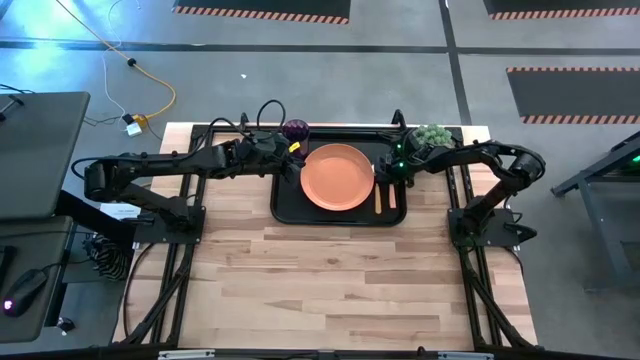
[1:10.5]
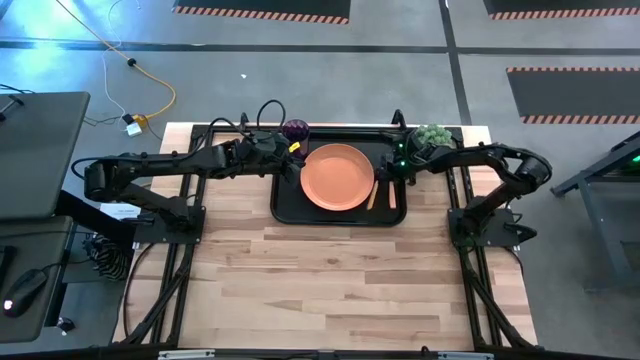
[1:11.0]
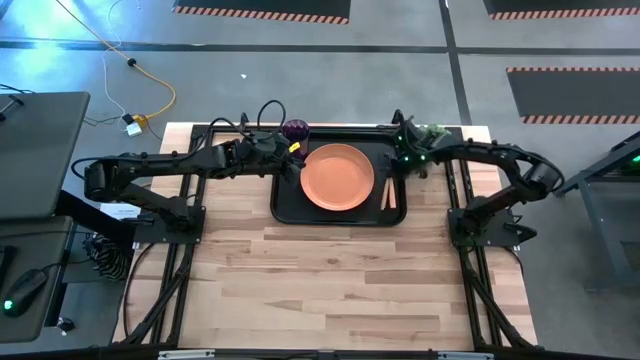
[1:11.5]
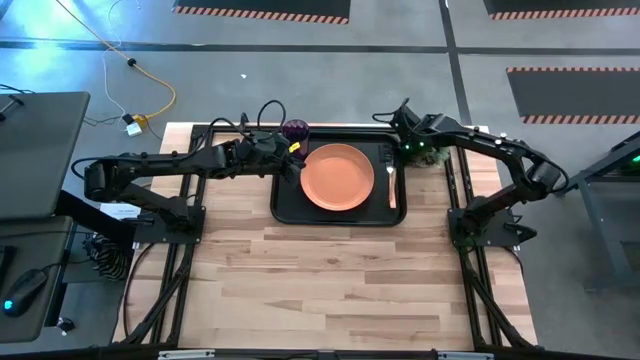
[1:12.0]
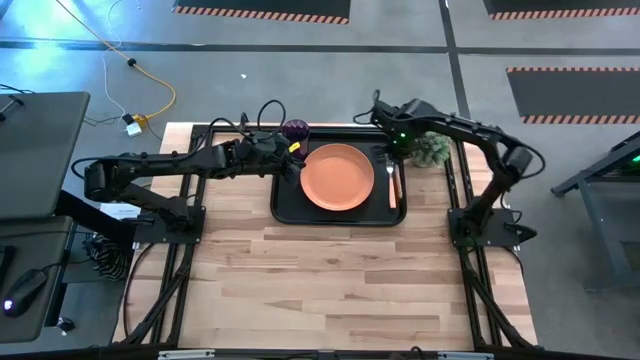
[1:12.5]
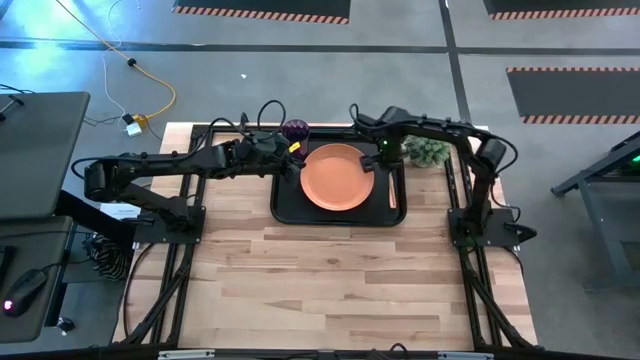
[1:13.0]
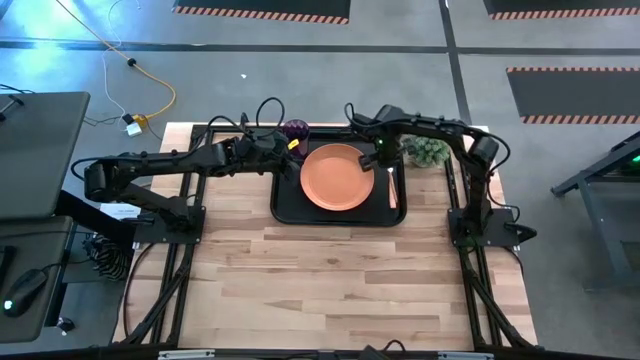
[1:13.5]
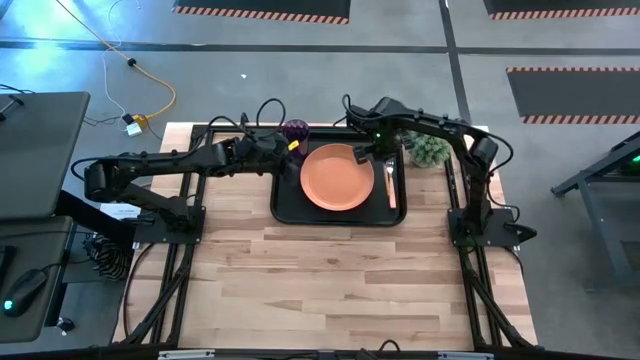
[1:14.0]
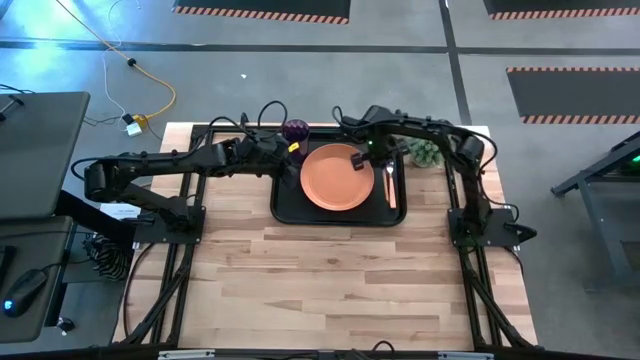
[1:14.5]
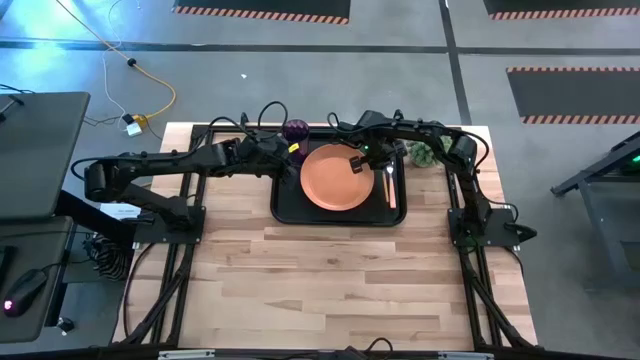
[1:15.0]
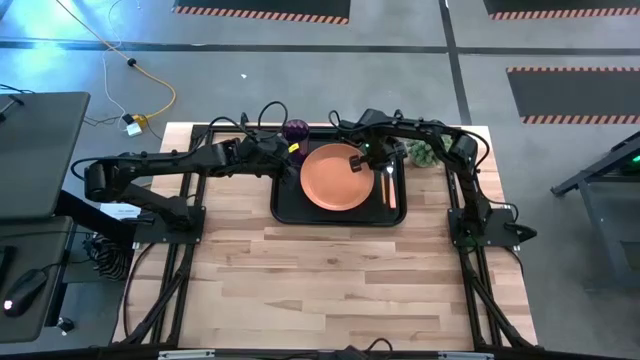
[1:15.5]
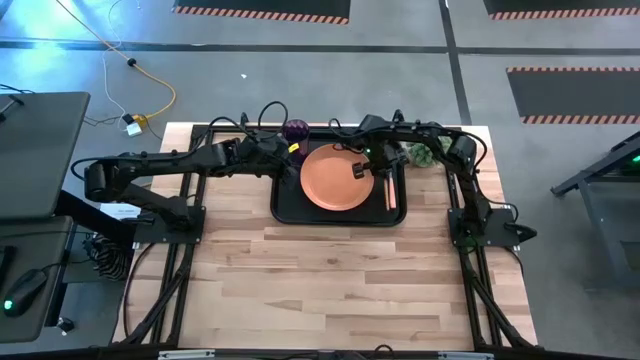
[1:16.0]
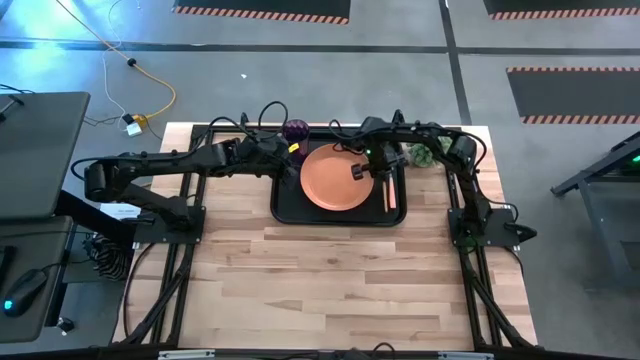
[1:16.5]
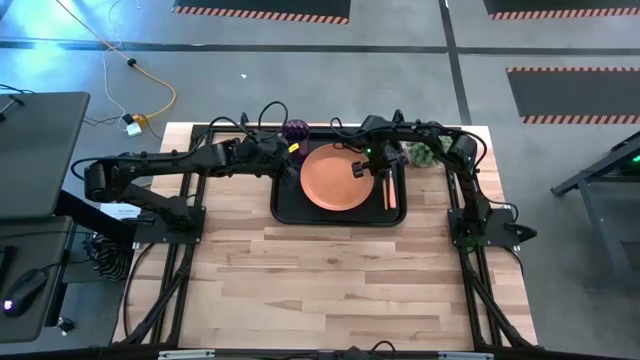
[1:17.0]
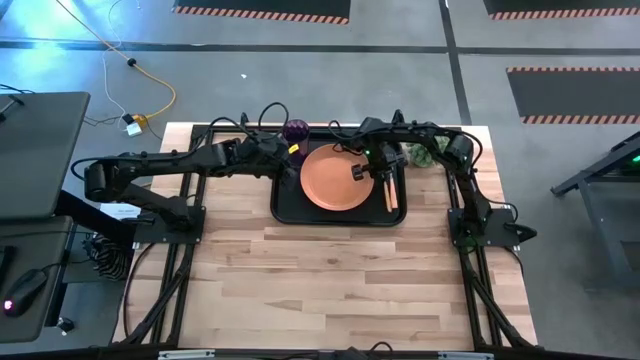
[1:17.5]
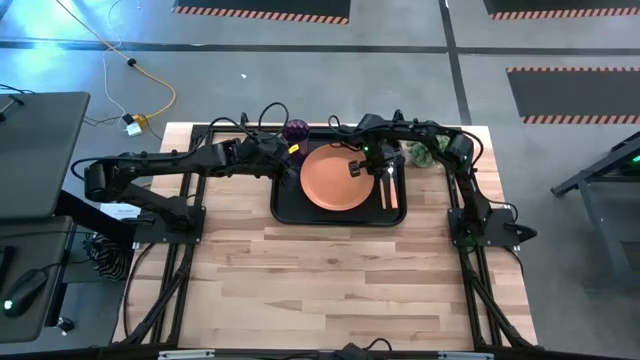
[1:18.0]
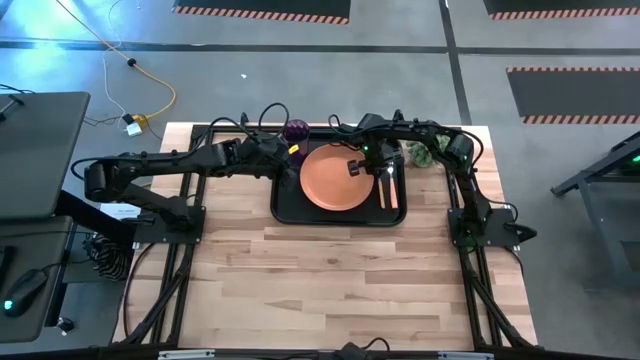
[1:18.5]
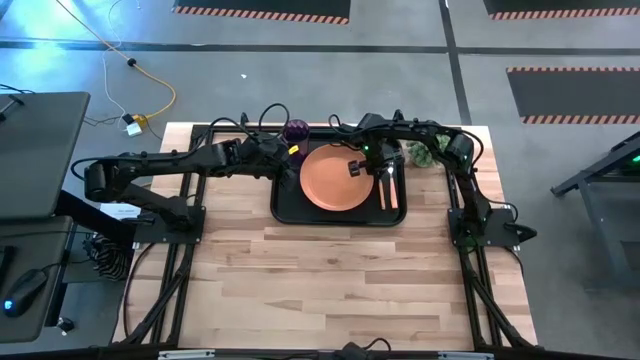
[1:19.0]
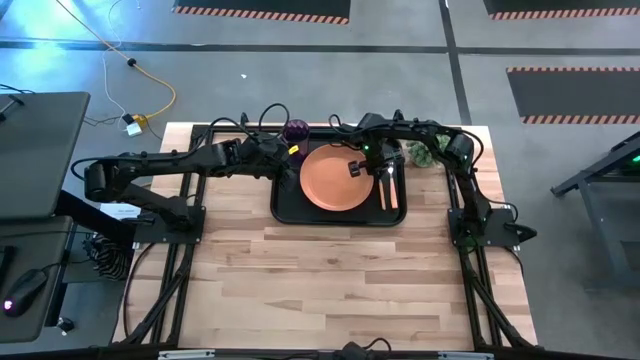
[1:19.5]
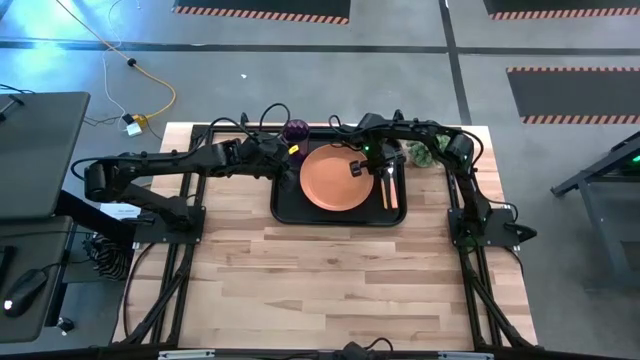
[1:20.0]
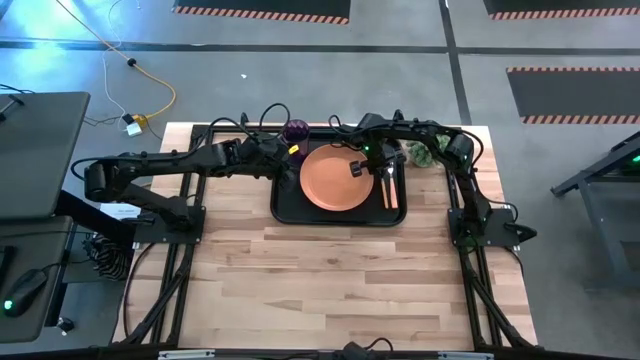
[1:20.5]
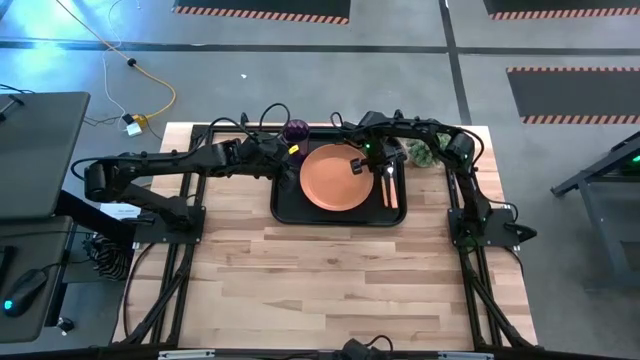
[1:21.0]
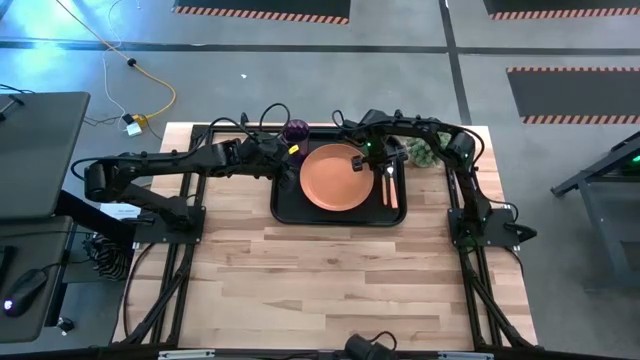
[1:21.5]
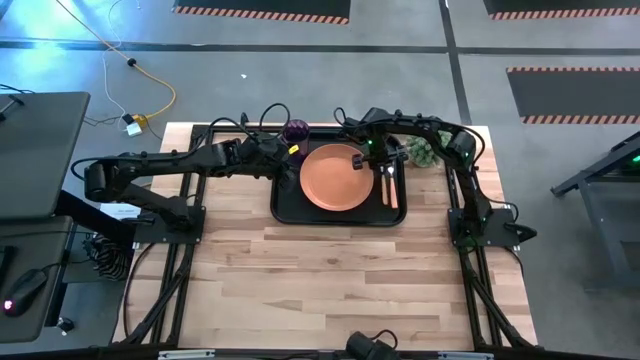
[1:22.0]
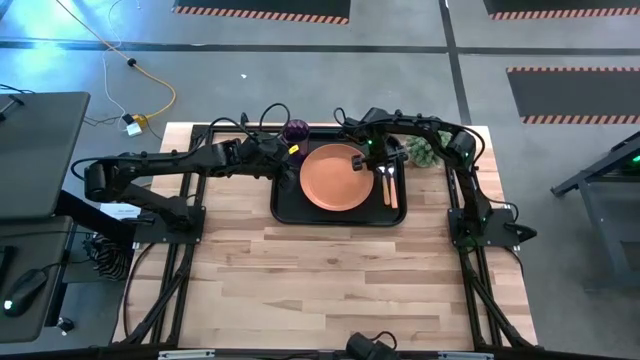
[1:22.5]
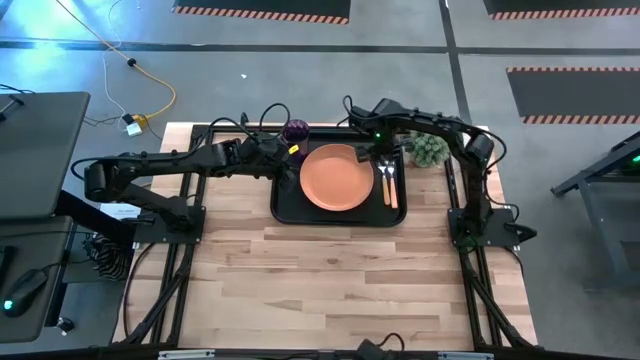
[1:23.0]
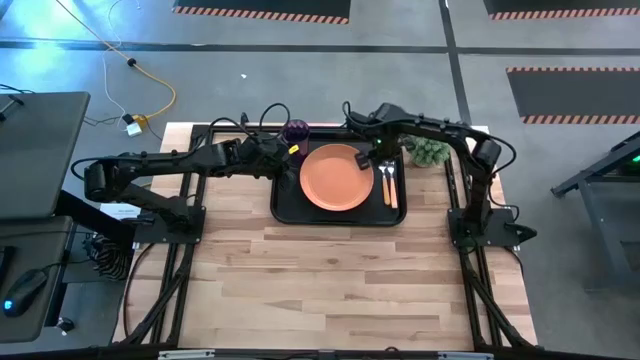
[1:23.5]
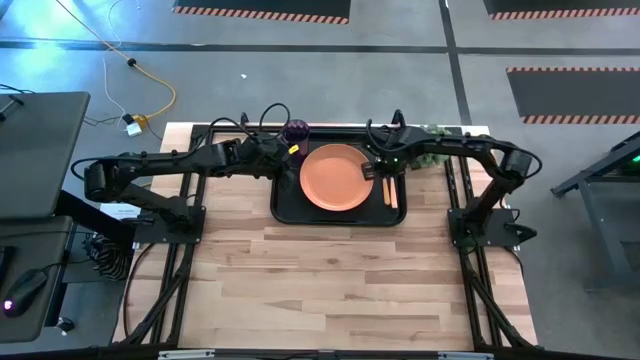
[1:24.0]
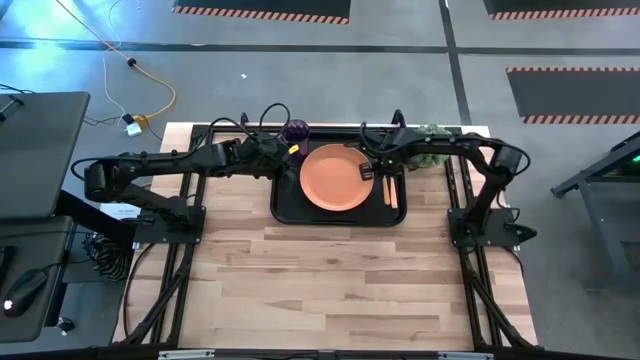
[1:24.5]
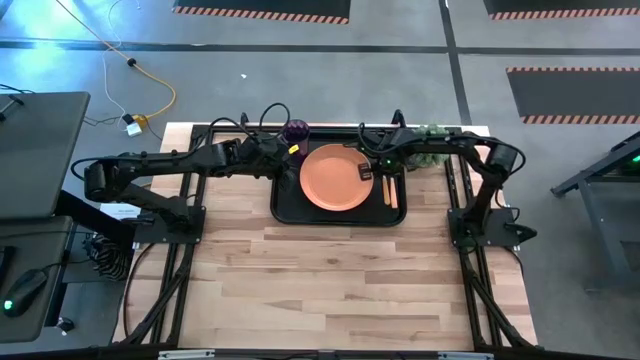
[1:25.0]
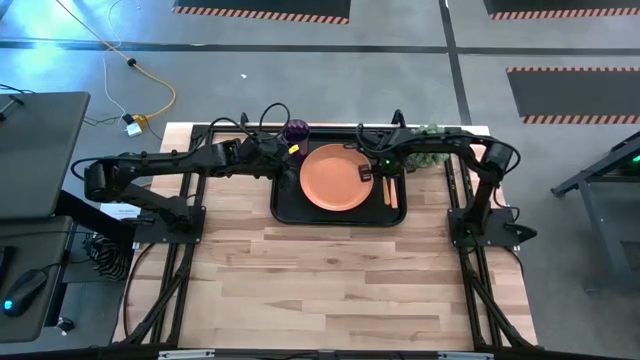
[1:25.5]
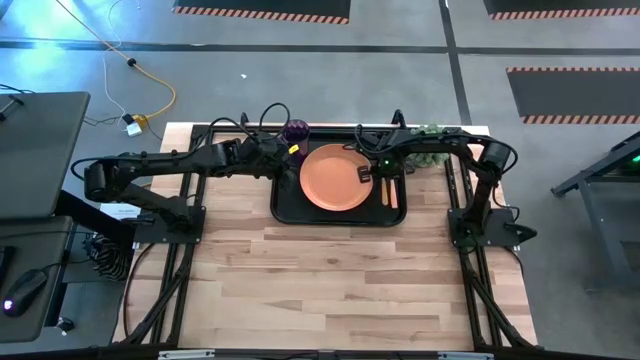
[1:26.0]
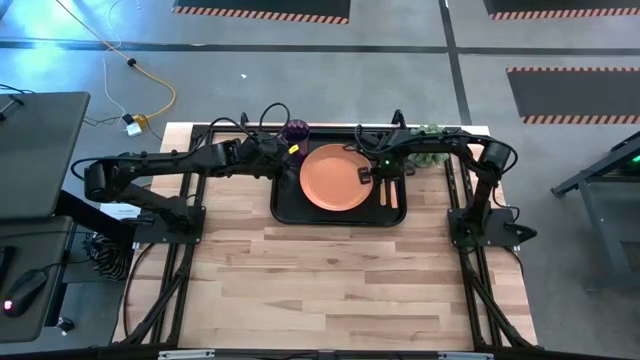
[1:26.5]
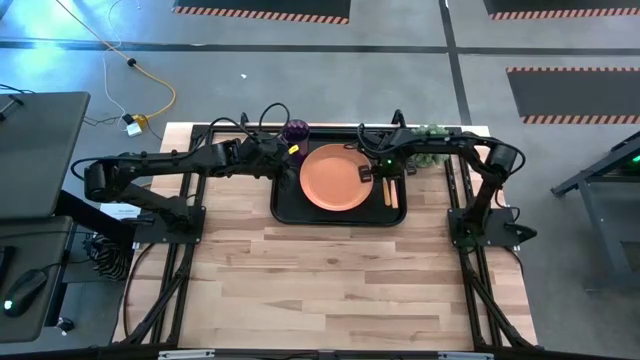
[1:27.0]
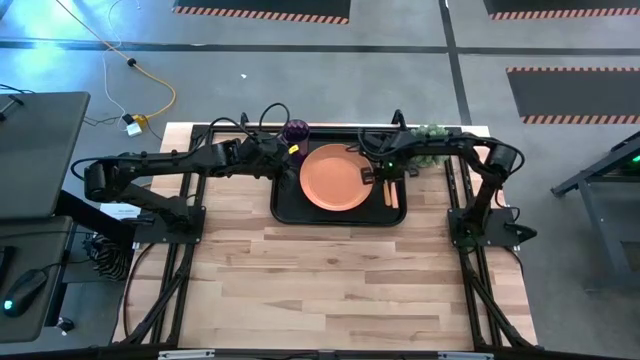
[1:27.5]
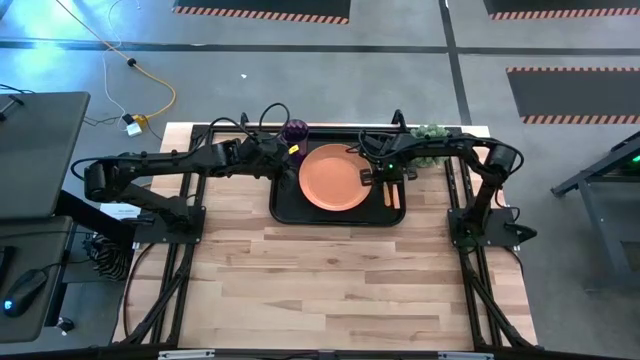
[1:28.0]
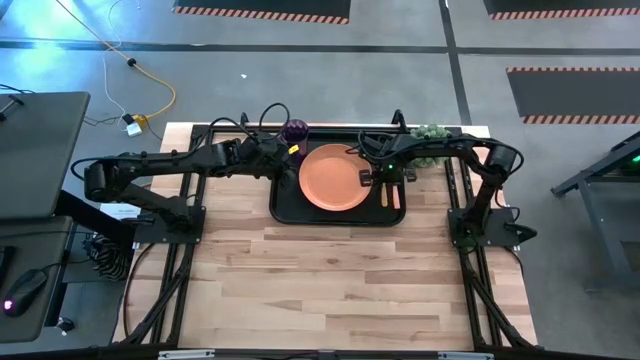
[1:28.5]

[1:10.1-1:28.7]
Task: Pick and place plate/cup/fork/spoon on tray
Put the yellow spoon on the black tray
